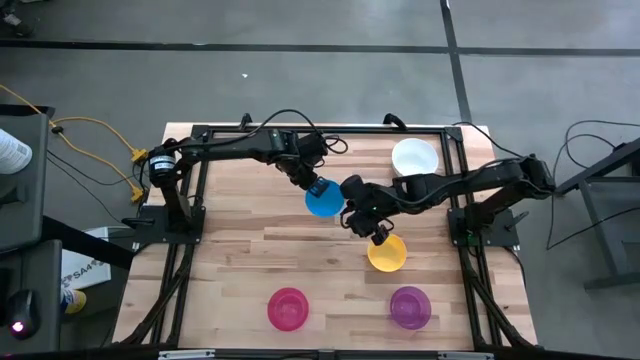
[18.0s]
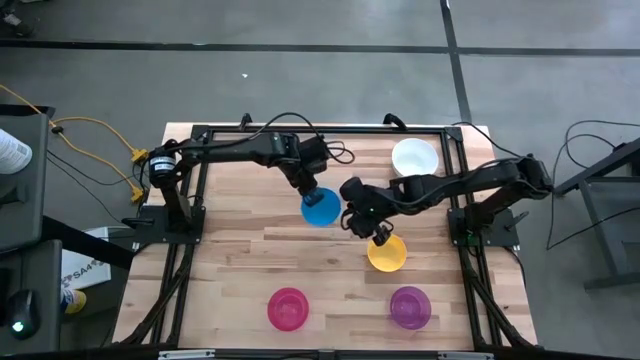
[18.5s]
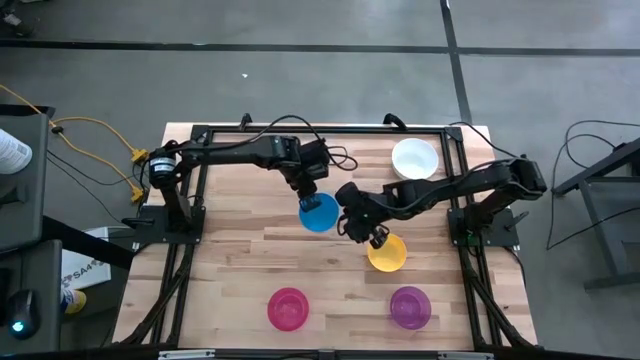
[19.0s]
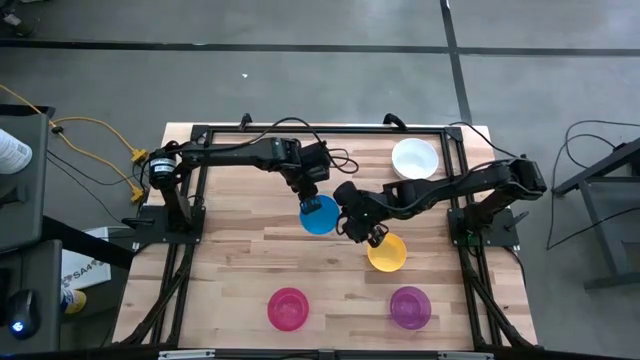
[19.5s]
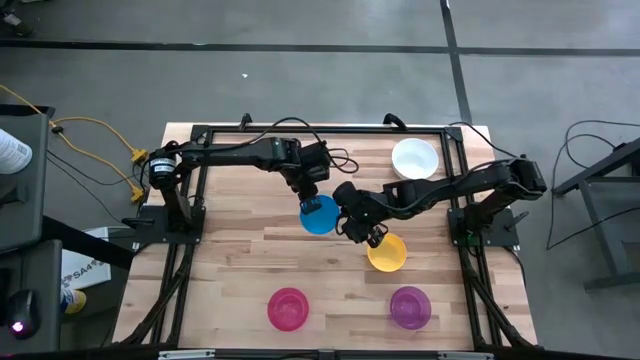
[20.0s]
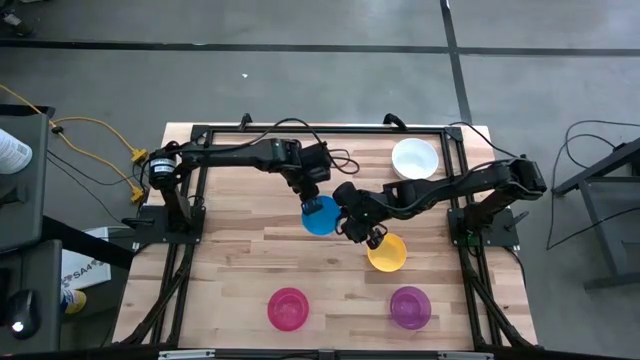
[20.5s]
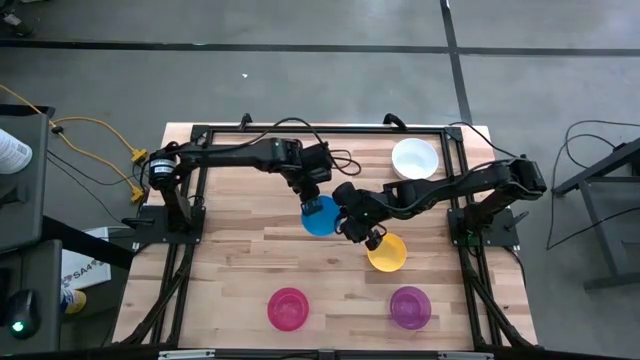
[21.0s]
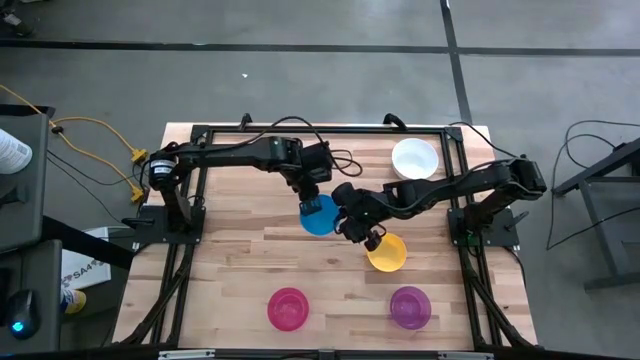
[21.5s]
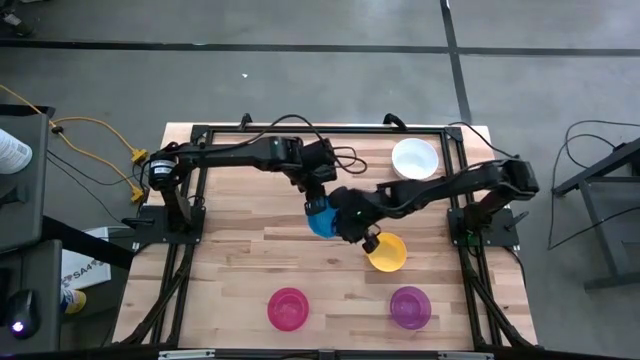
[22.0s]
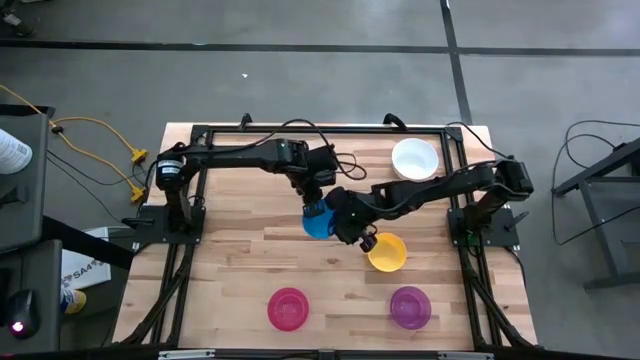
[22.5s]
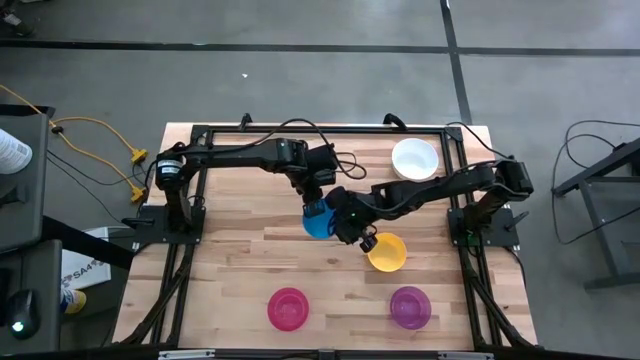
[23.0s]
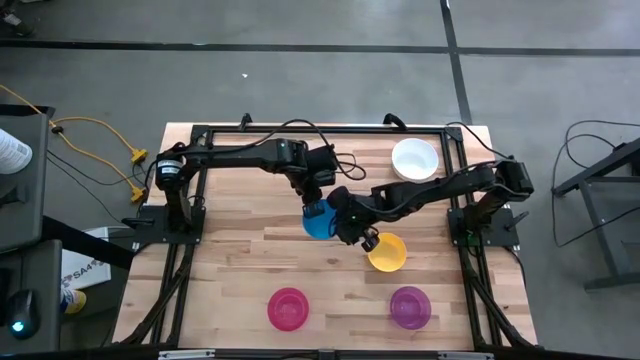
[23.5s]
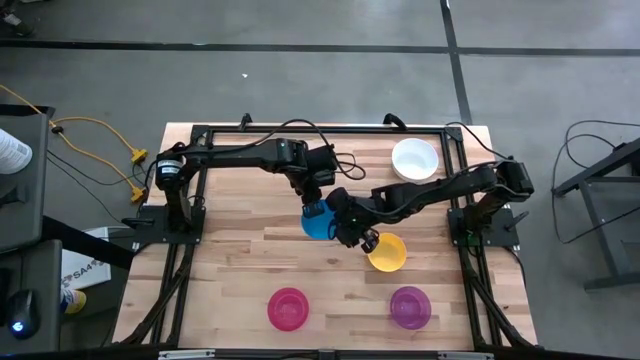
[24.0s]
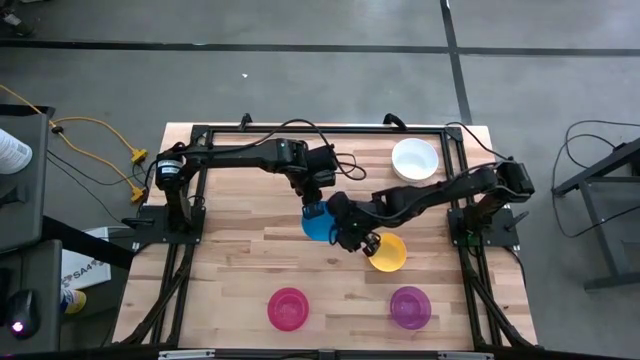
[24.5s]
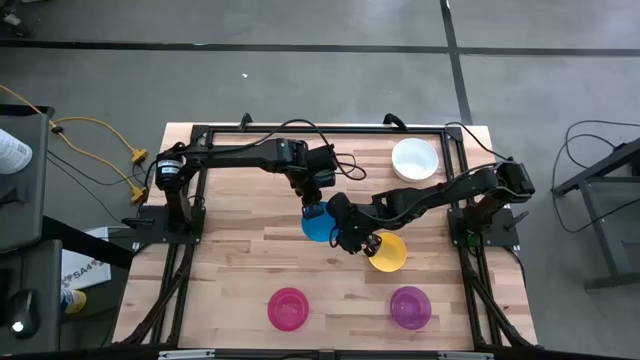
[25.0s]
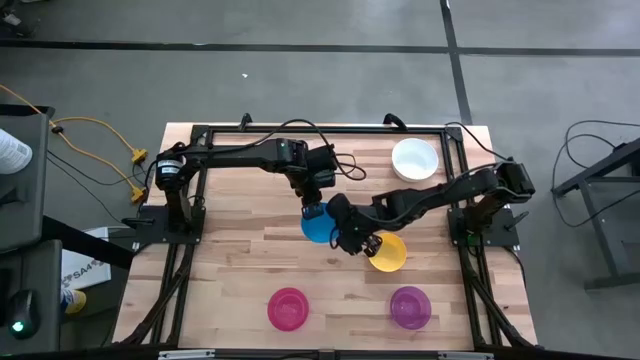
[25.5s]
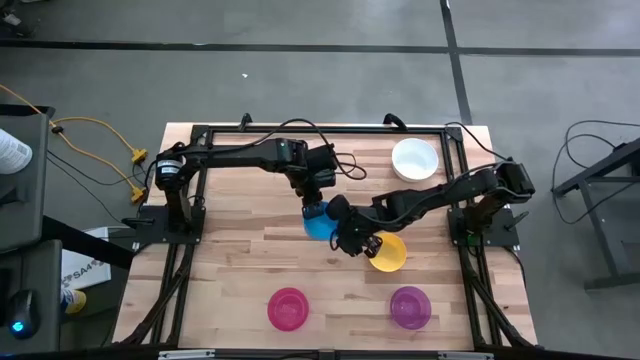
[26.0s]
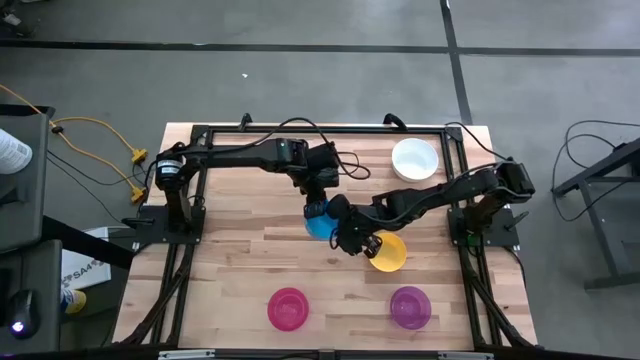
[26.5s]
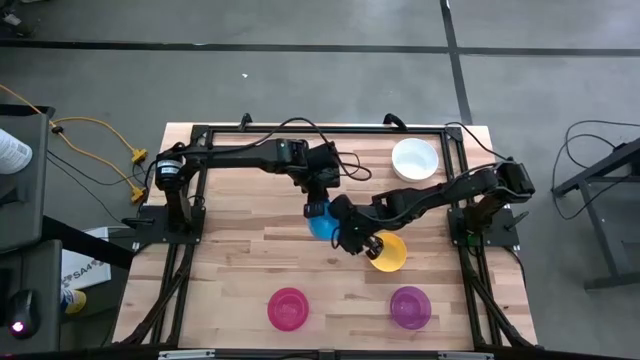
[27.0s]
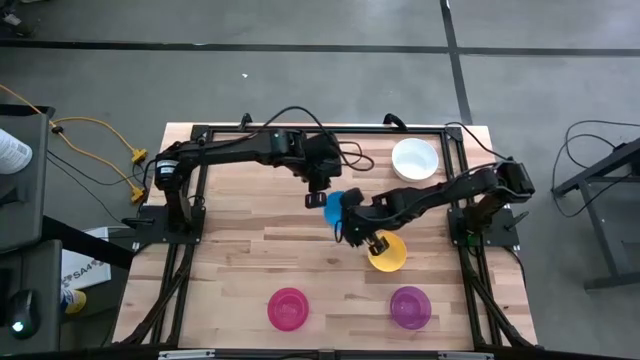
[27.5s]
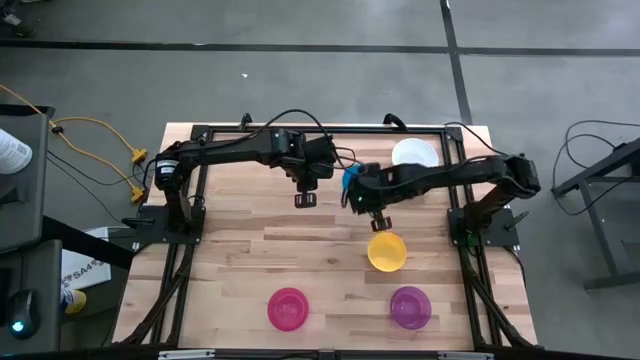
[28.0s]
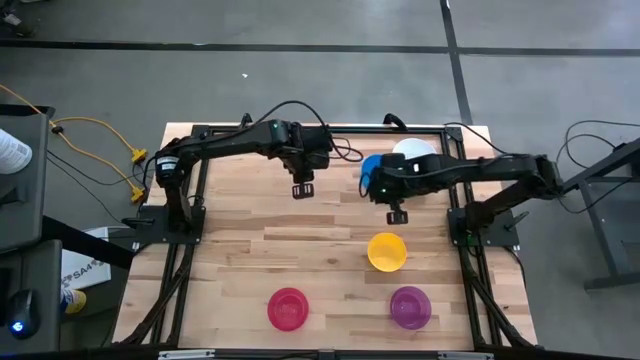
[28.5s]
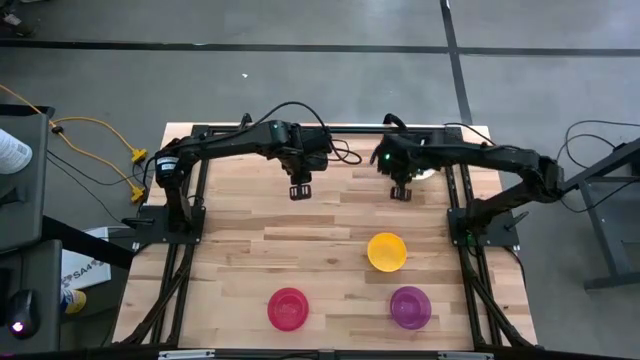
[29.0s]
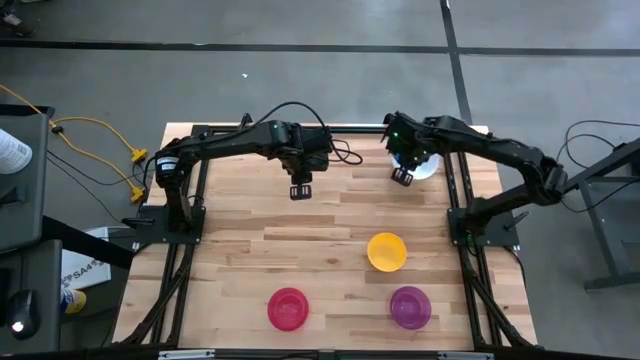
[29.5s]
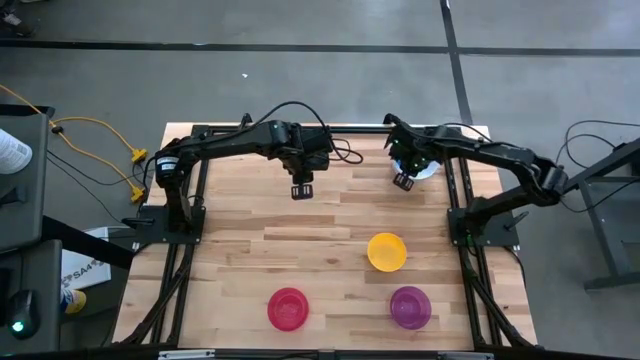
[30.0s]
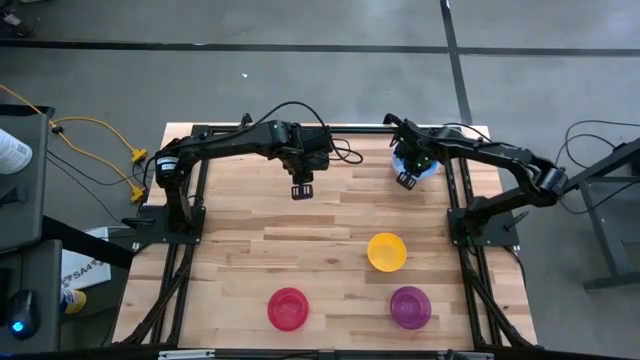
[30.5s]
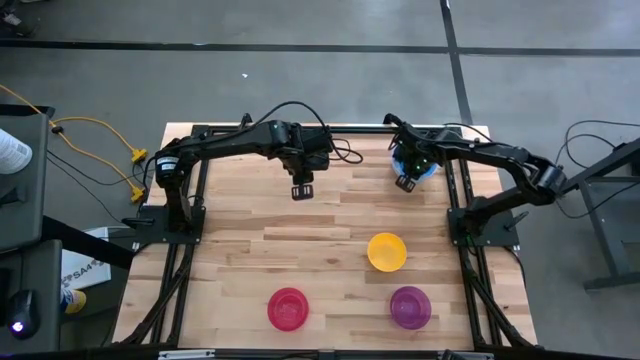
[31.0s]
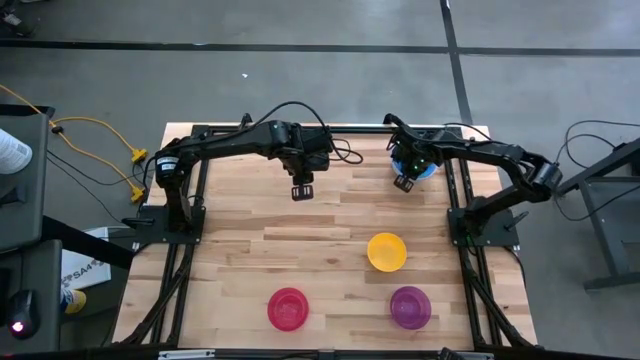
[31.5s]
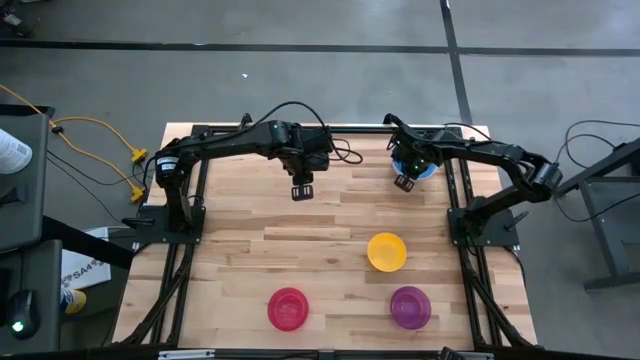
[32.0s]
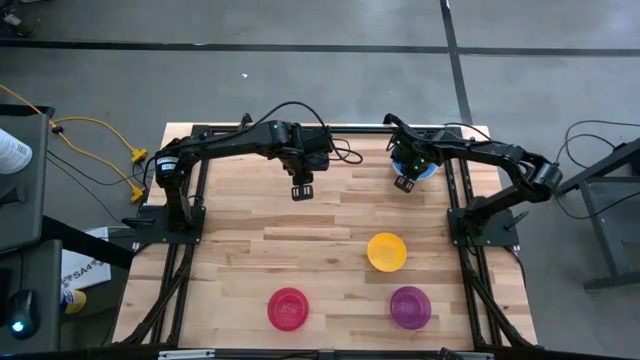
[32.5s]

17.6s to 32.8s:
Stack the blue bowl on top of the white bowl

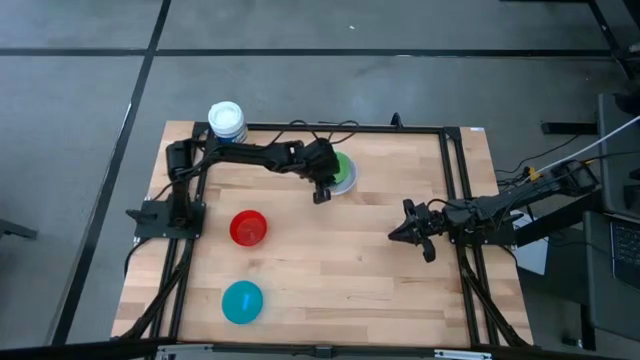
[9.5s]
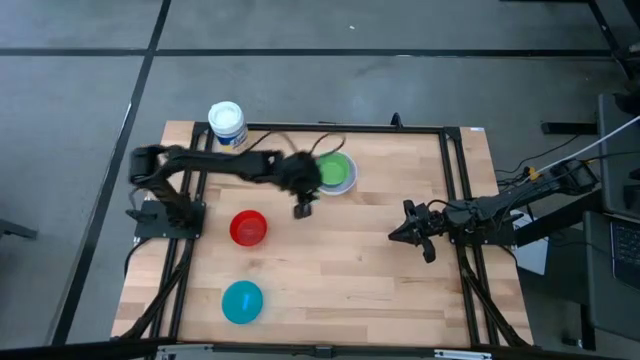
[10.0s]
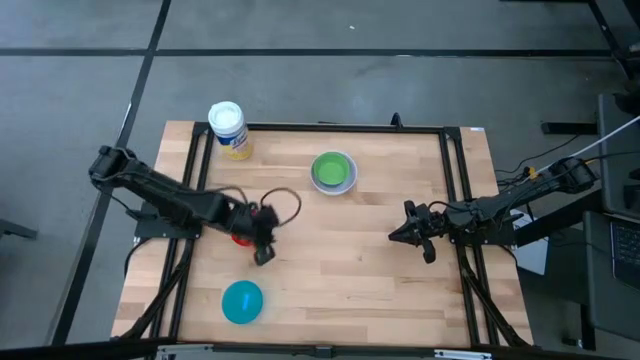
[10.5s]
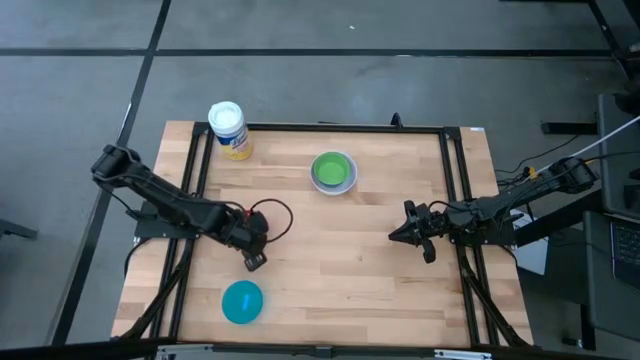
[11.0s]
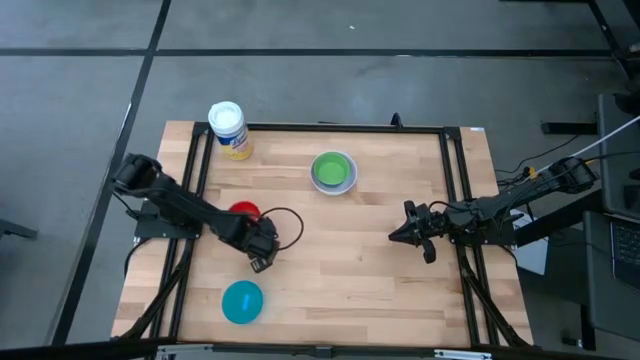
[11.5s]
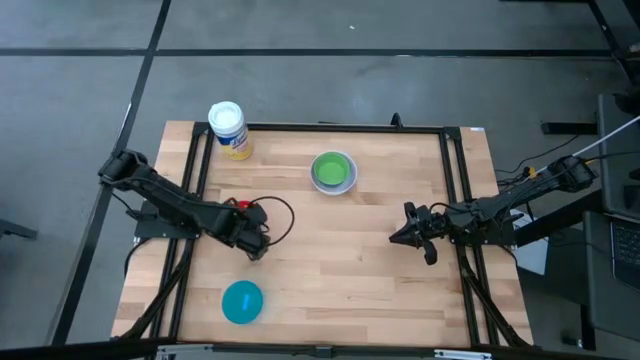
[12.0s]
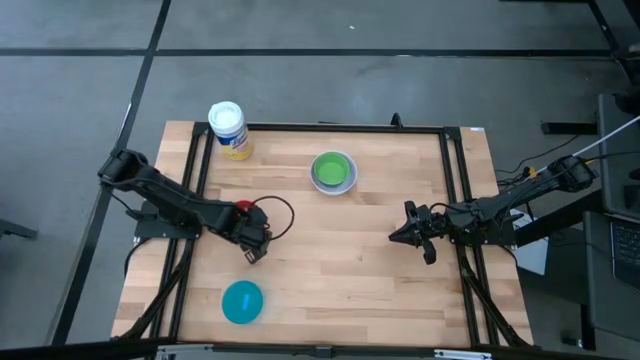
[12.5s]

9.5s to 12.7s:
Stack the red bowl on the green bowl

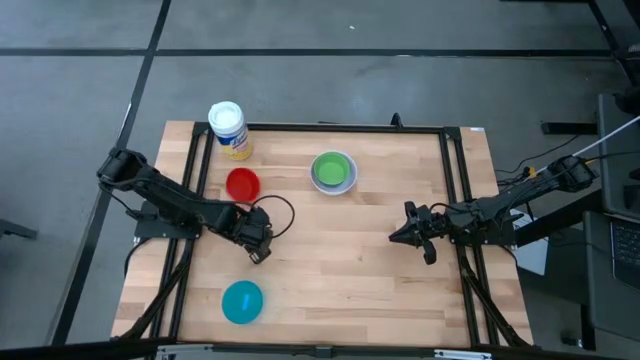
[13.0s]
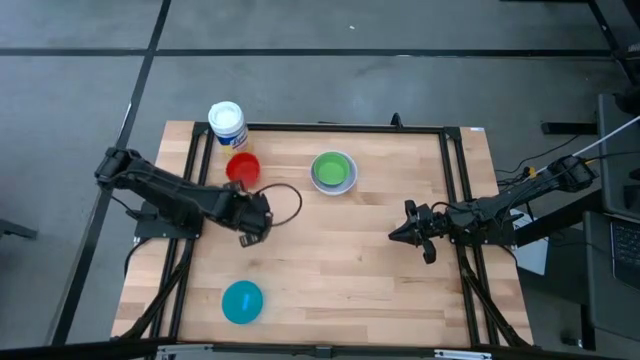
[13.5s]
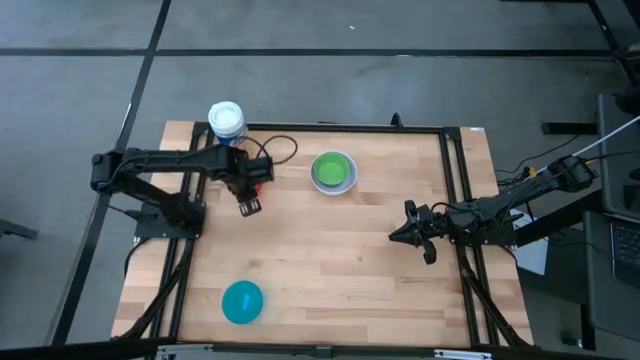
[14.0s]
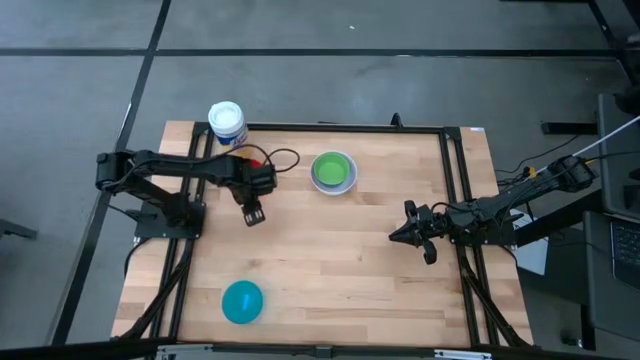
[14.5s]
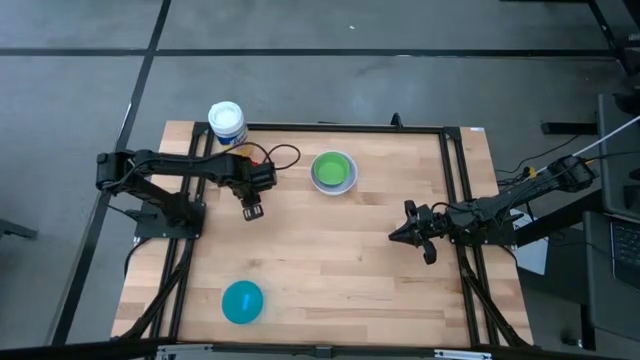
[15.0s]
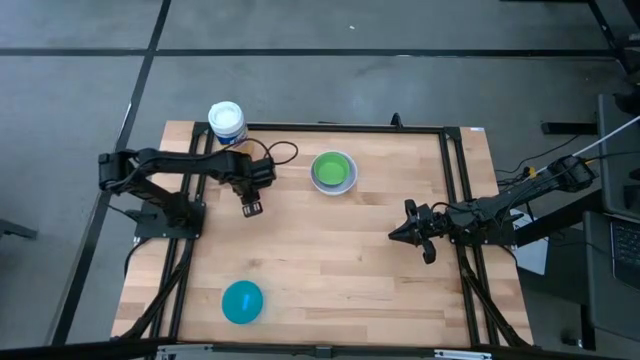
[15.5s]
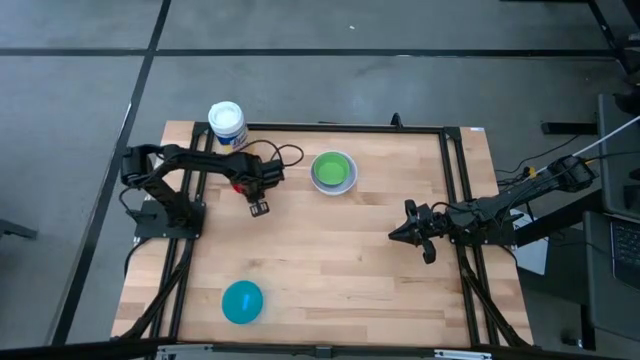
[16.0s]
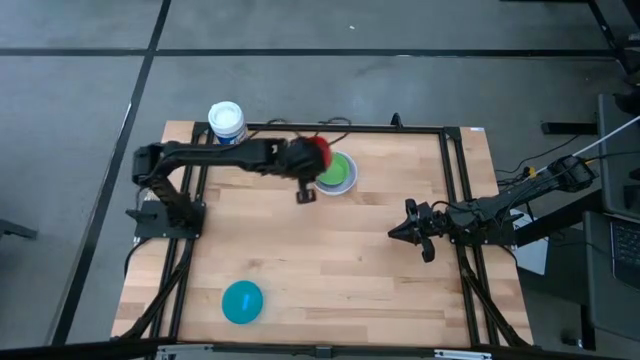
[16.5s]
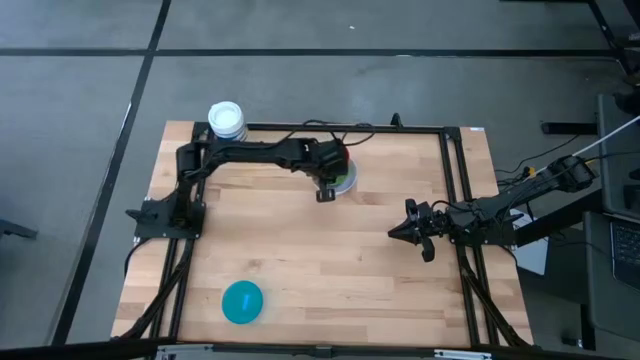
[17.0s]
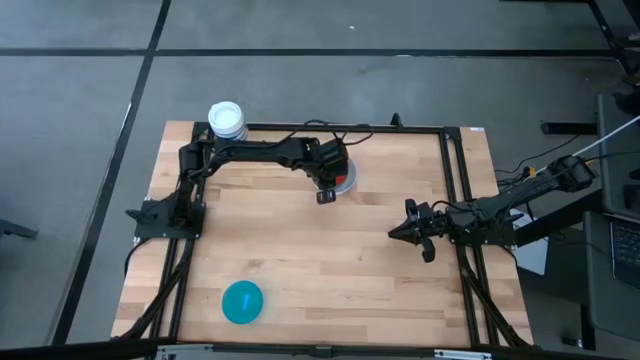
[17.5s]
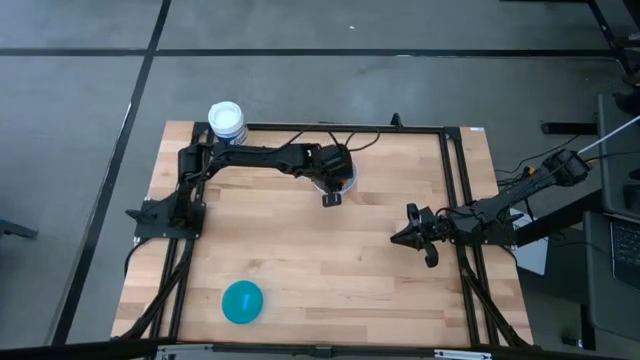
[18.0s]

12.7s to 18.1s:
Stack the red bowl on the green bowl
